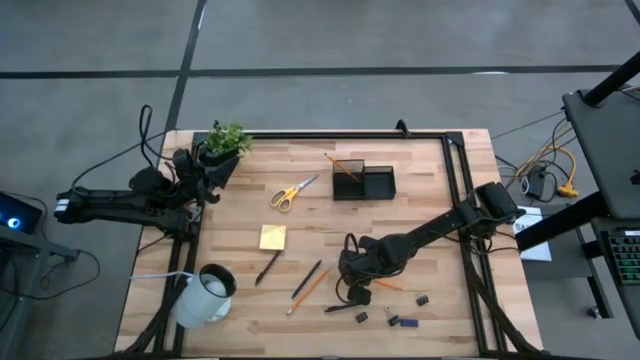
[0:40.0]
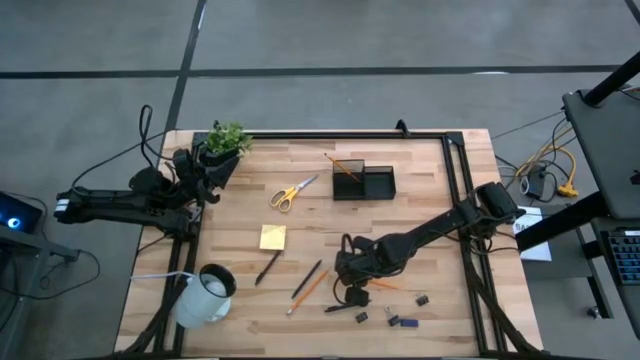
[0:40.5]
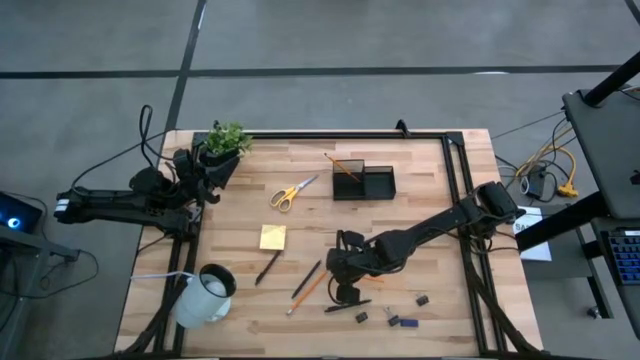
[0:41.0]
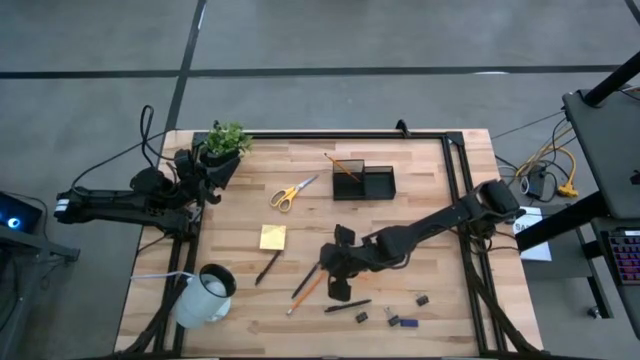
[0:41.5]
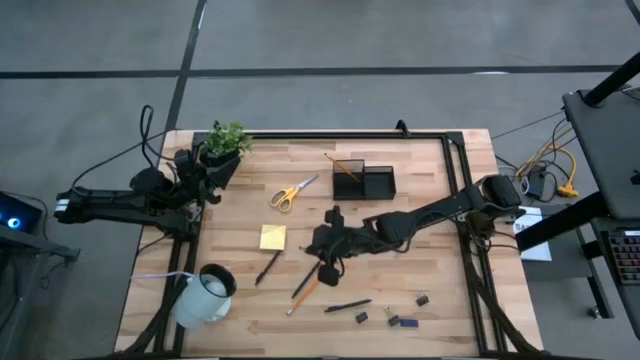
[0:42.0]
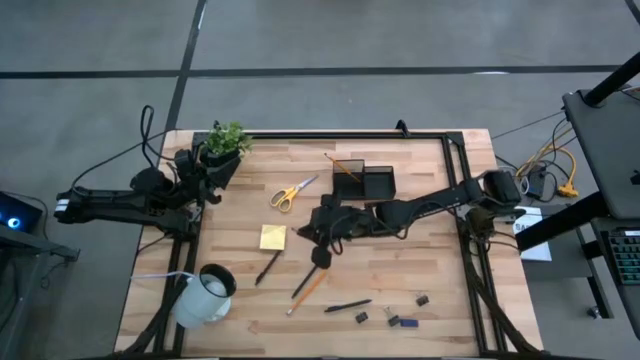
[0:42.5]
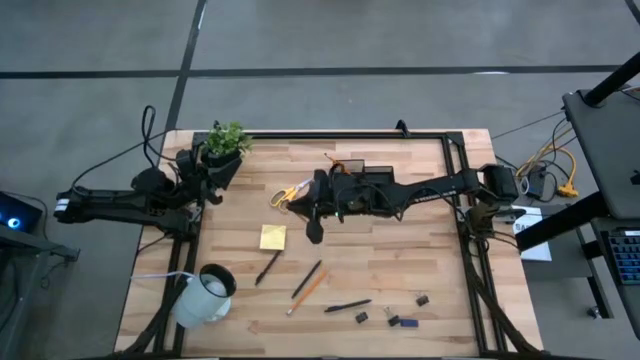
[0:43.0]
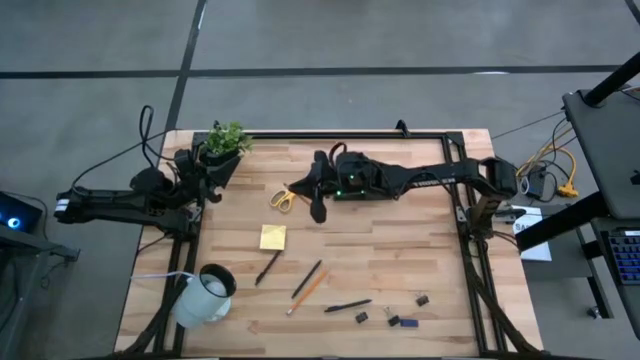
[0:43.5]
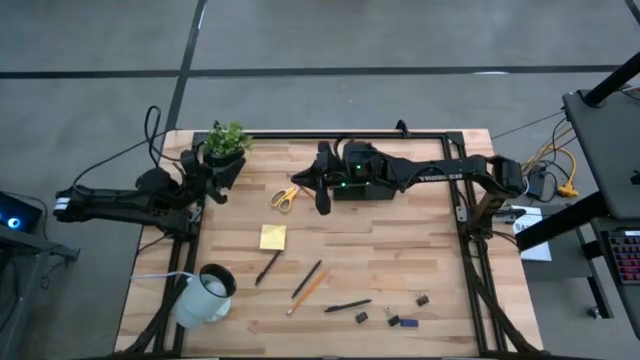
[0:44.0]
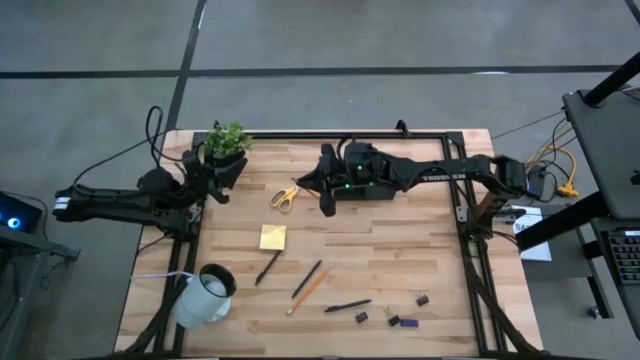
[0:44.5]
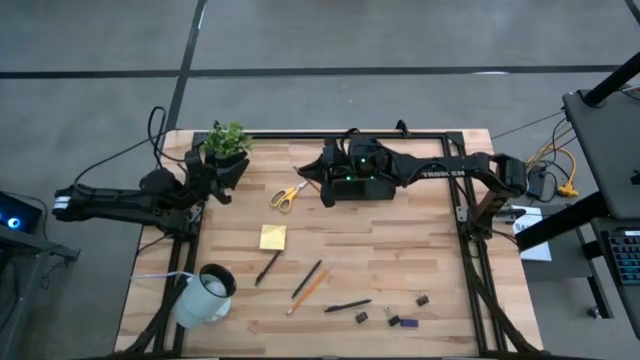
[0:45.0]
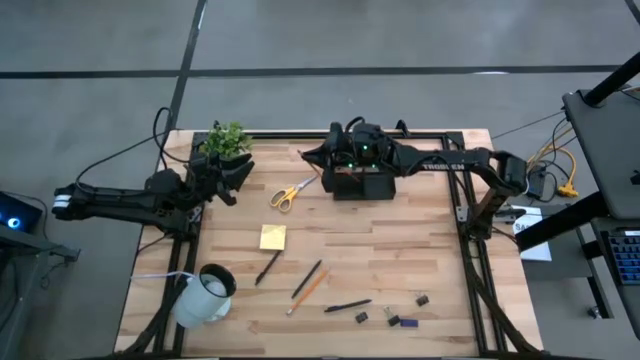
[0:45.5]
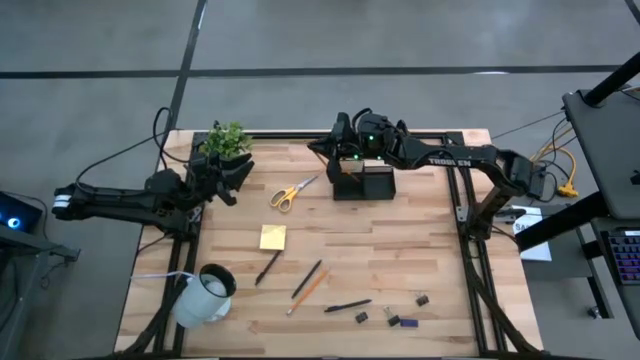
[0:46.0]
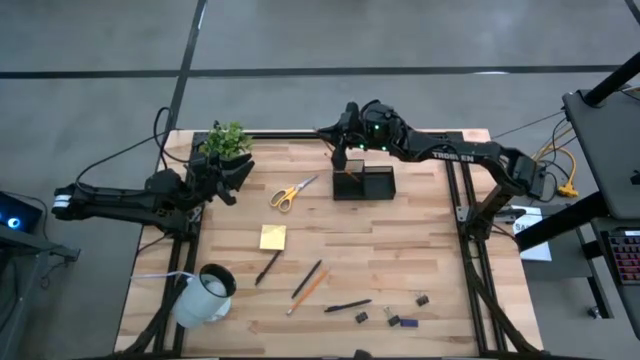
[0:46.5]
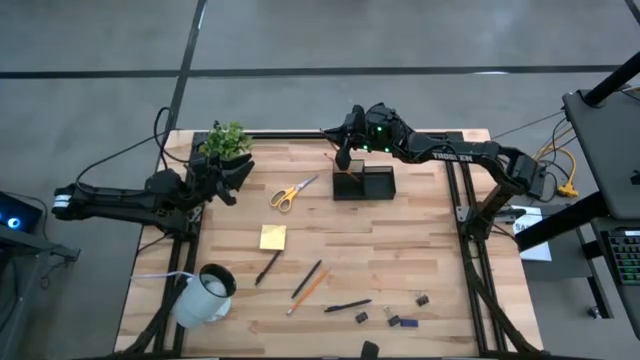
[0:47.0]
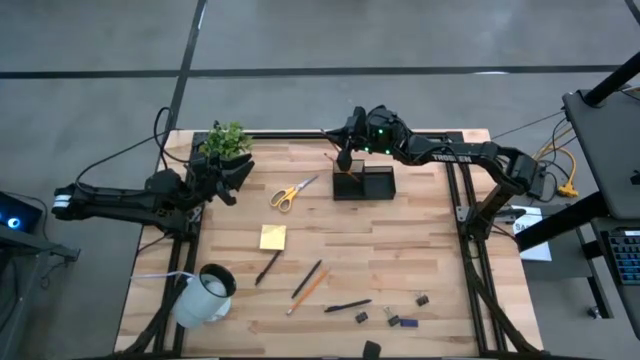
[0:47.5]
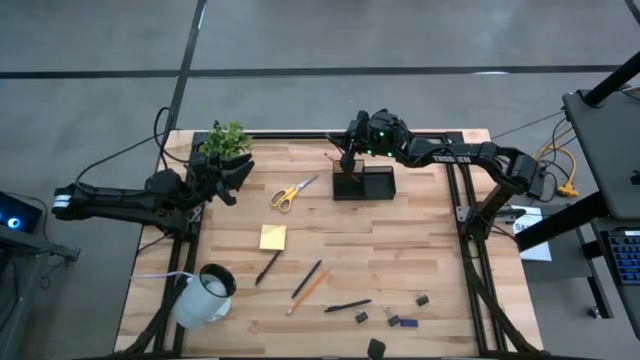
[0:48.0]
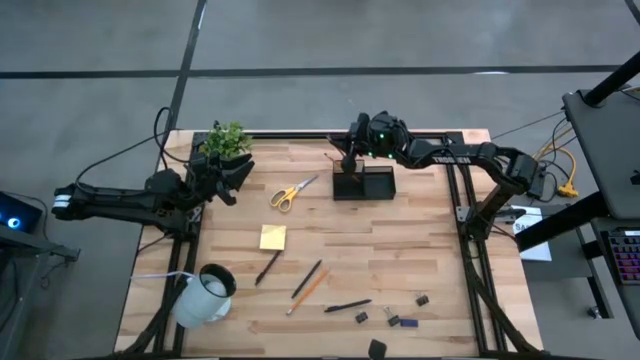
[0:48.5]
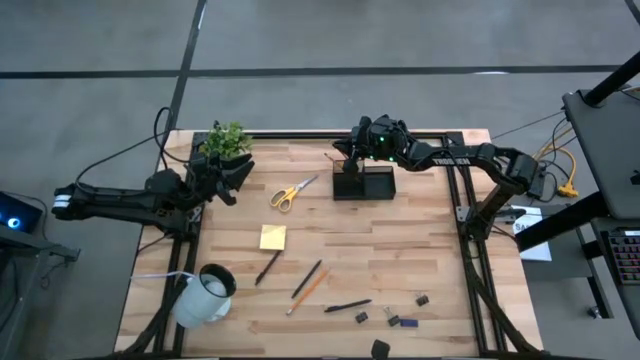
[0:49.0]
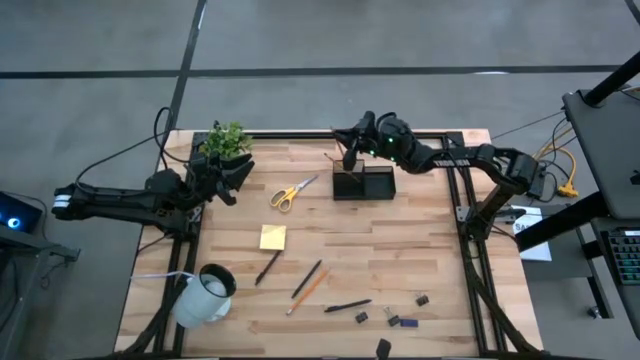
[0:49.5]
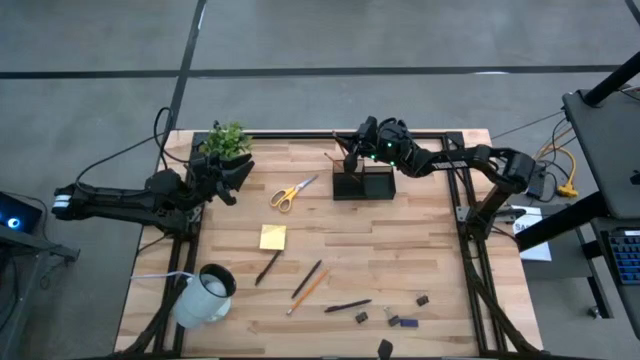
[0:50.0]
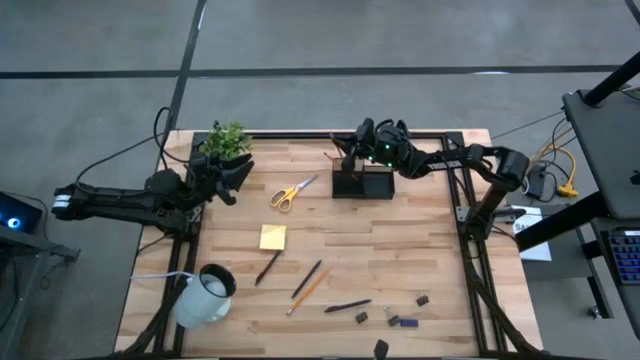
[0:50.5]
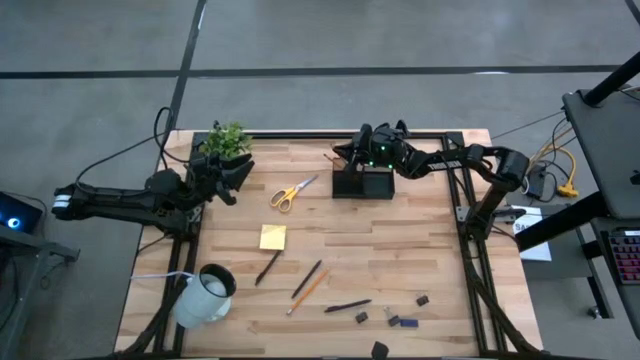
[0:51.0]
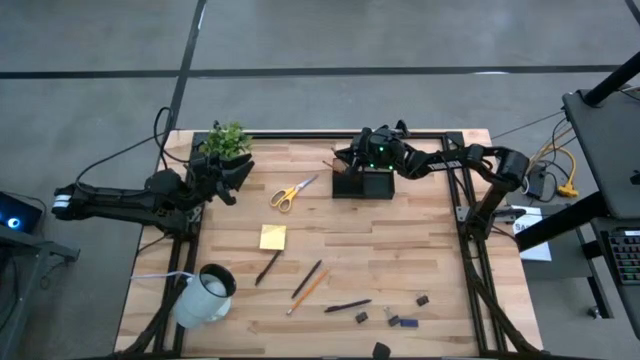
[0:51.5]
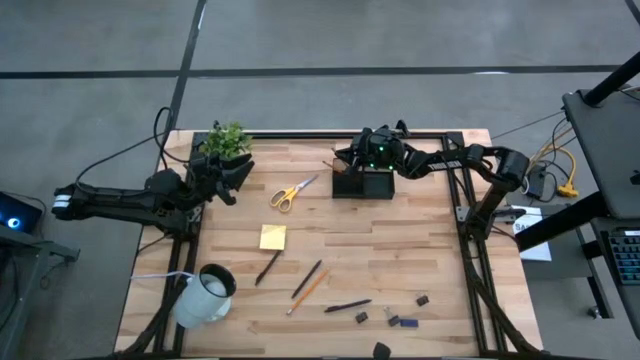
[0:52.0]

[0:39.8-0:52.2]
Task: Pick and place office supplies into organizer
Put the right pencil into the desk organizer

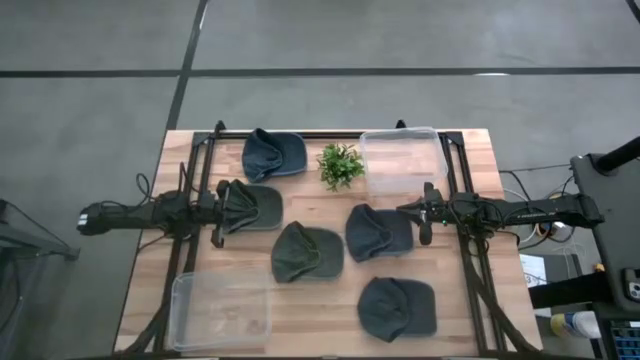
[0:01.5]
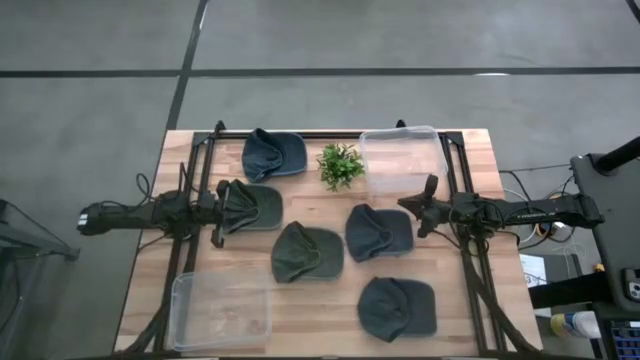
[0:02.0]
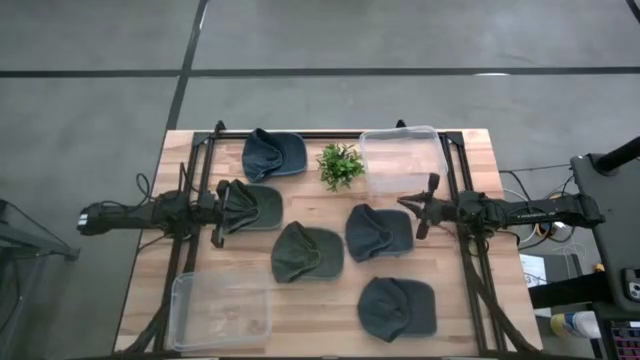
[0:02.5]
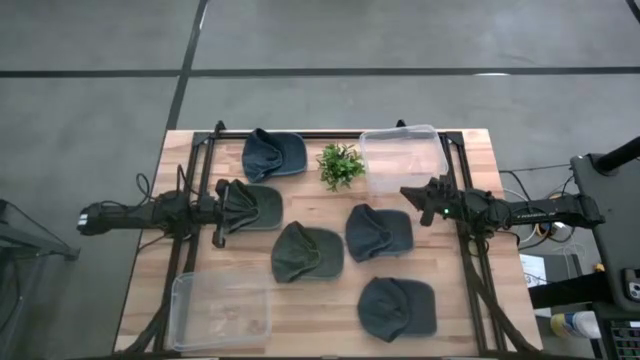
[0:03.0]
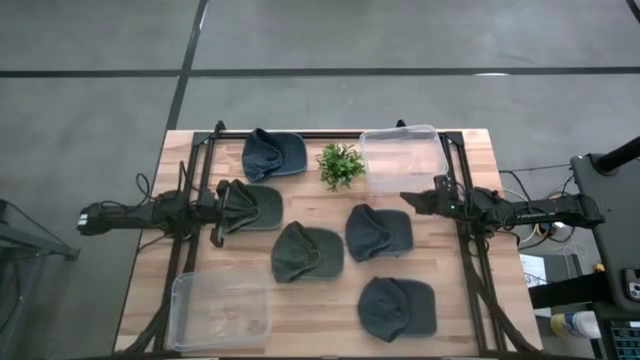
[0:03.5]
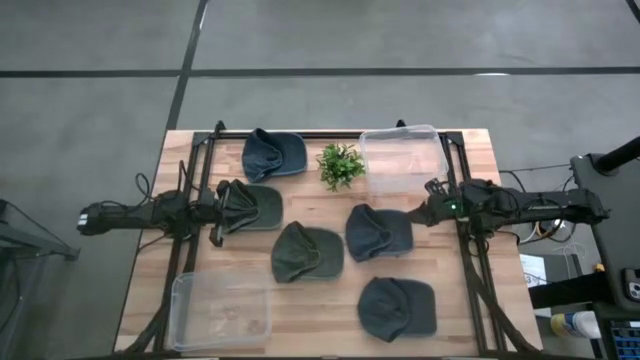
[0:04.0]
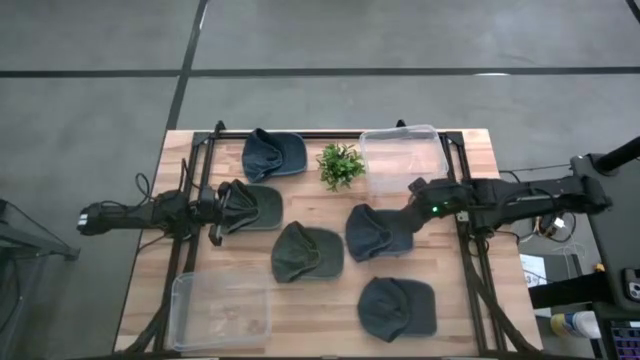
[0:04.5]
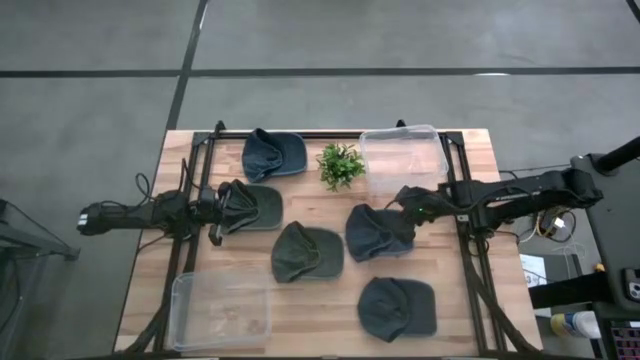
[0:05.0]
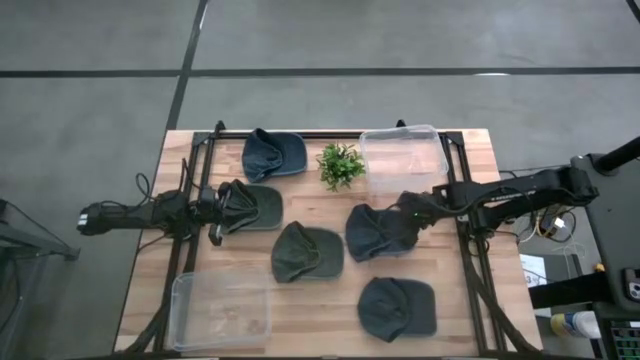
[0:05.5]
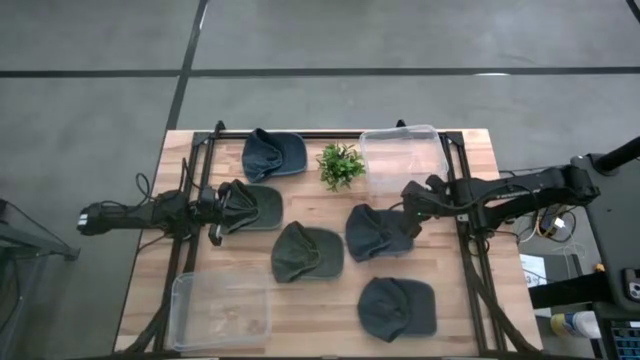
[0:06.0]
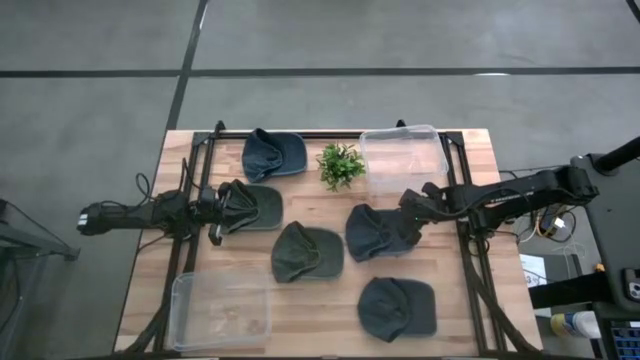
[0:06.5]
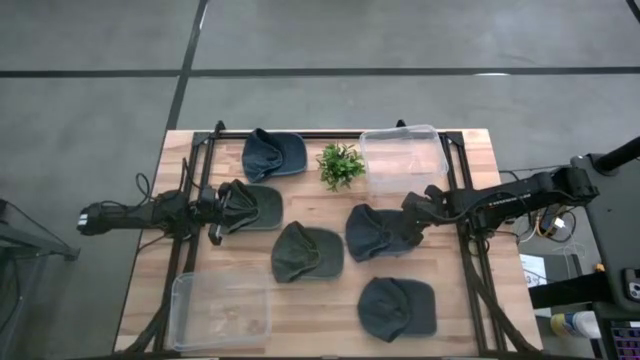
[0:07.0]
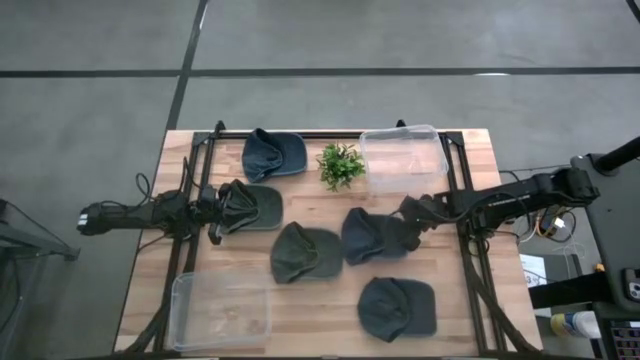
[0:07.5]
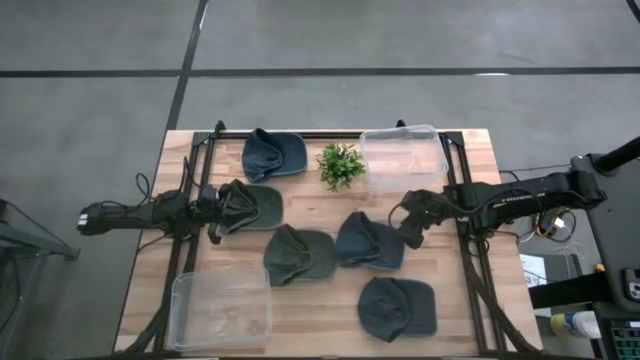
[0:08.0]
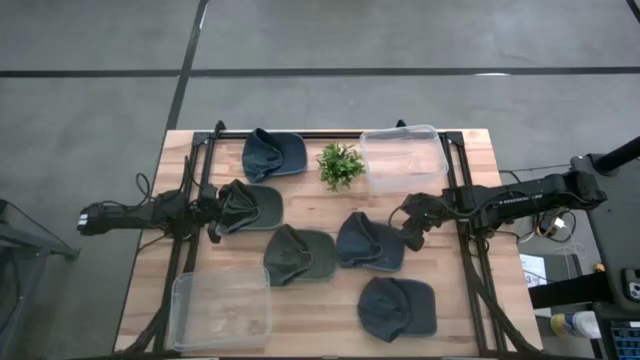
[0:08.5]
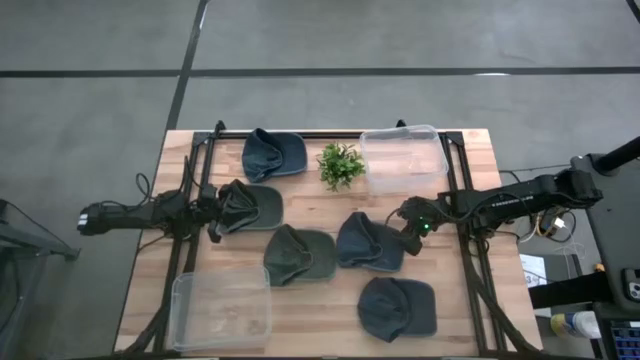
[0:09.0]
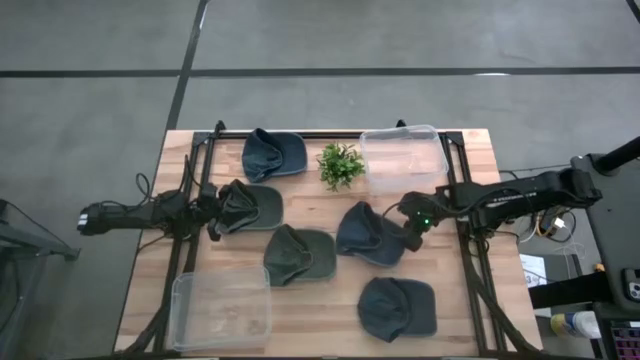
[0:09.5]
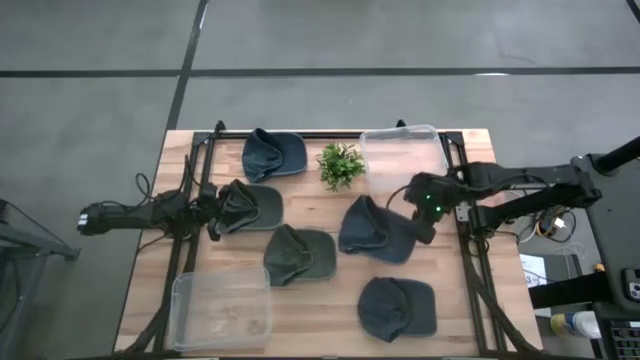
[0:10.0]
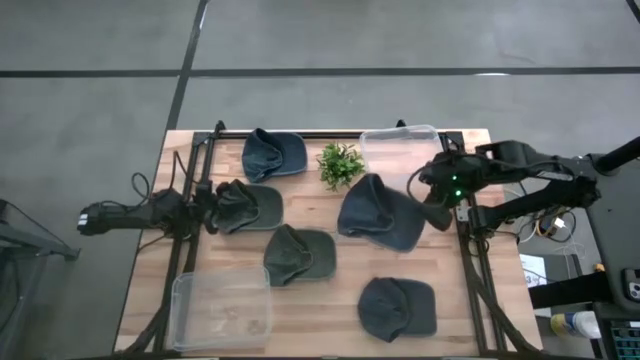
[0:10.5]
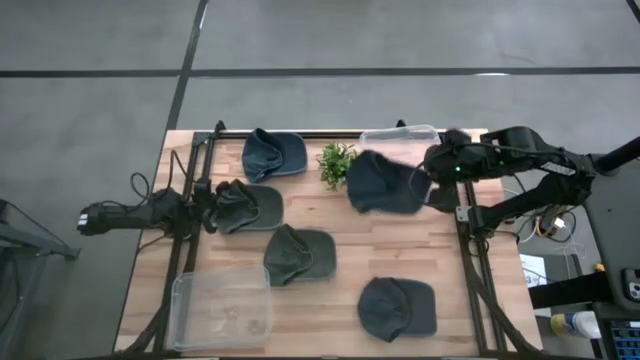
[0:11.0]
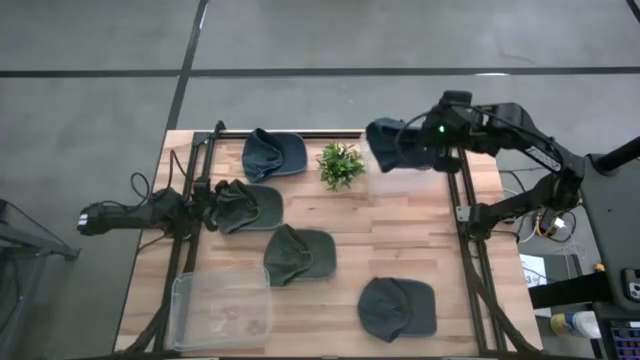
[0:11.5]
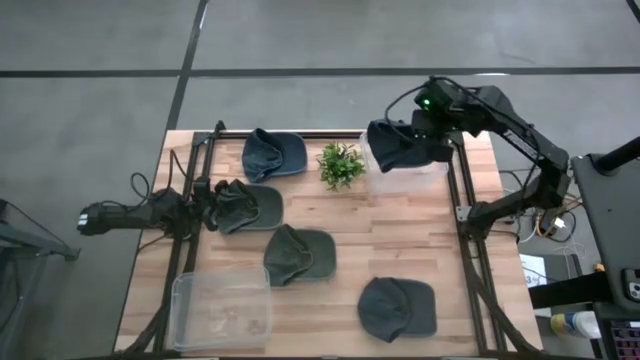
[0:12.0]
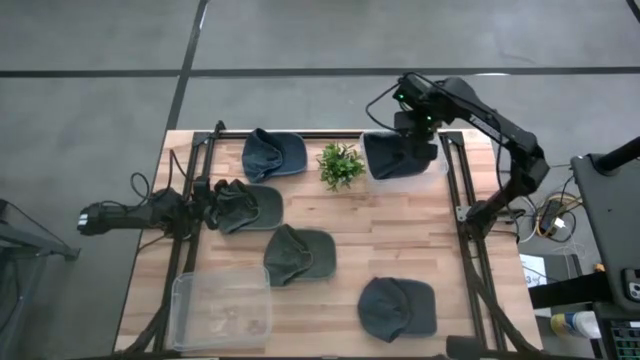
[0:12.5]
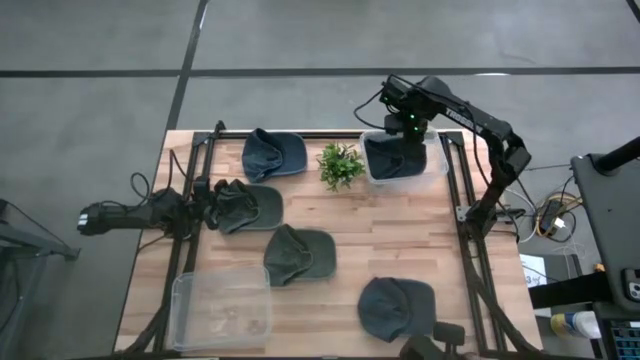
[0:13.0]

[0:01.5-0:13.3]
Task: Pick & Place hat
Put the middle blue cap into the top transparent bin
